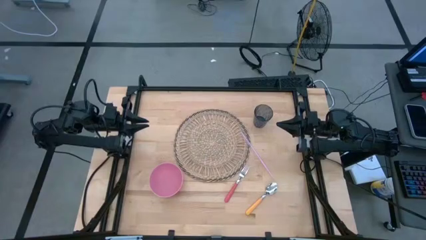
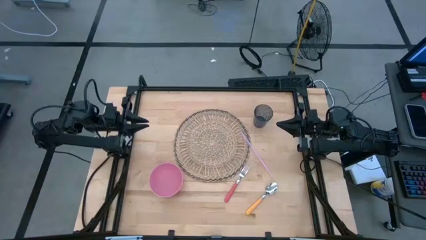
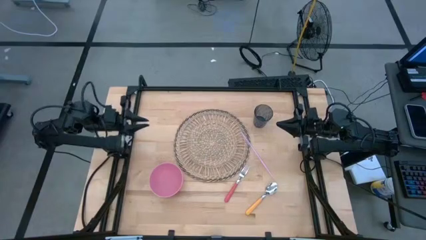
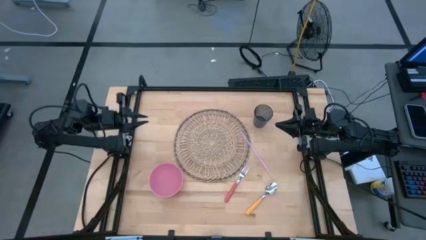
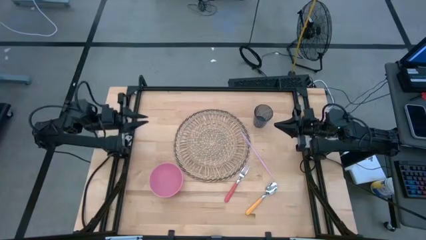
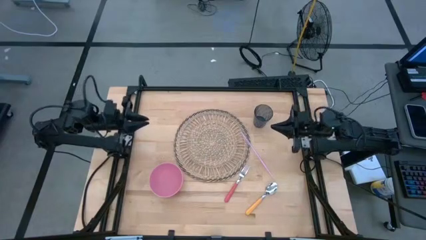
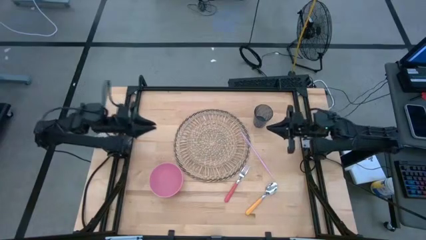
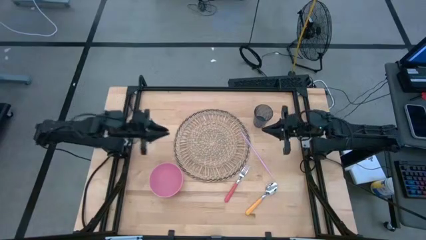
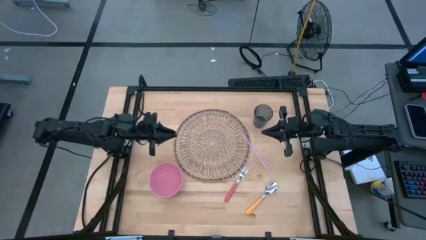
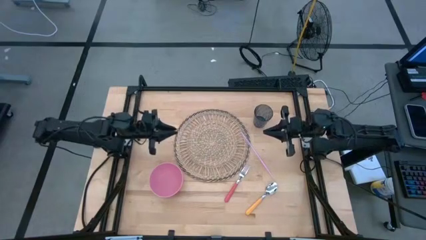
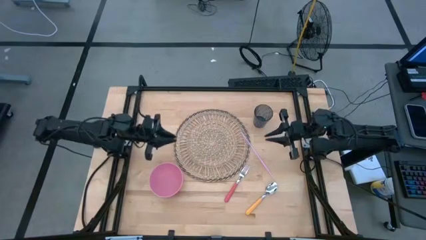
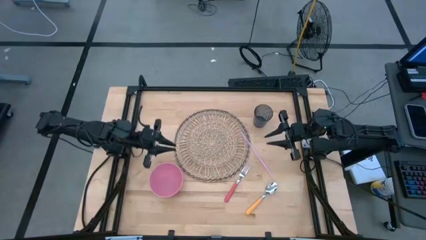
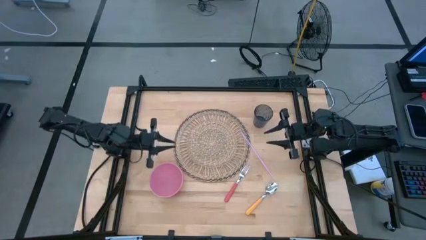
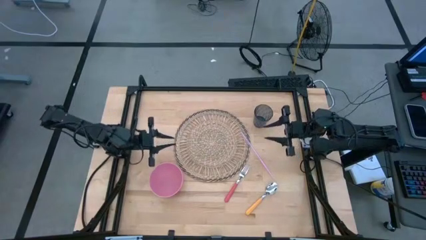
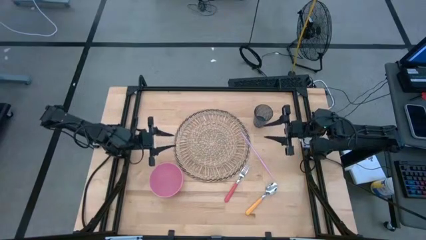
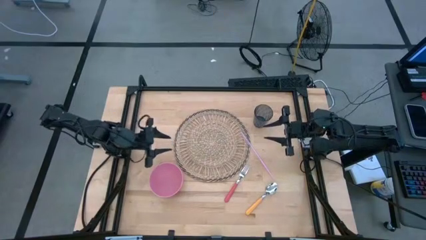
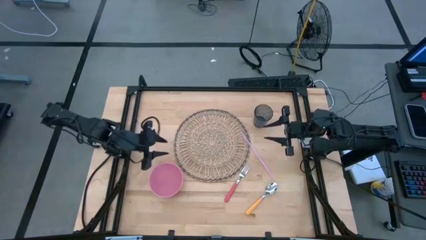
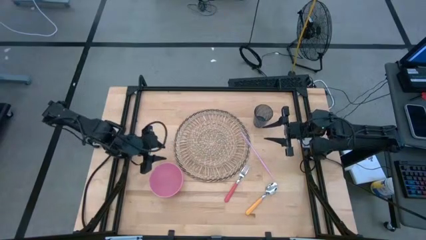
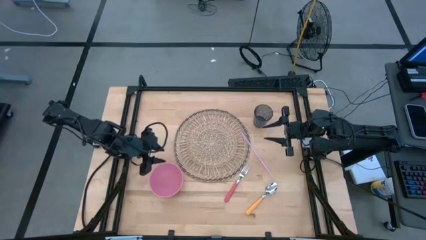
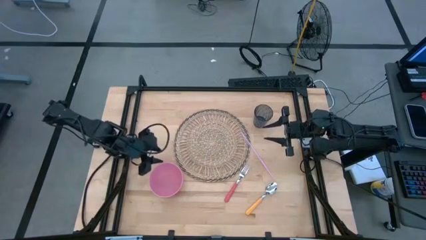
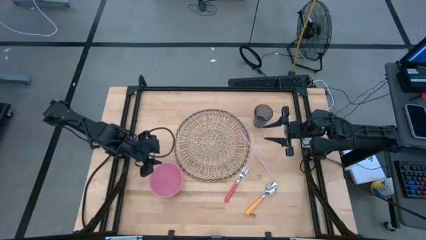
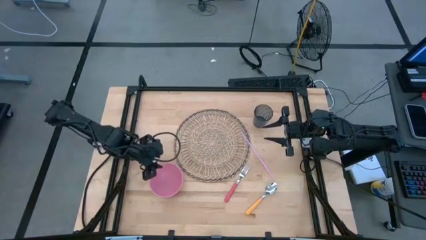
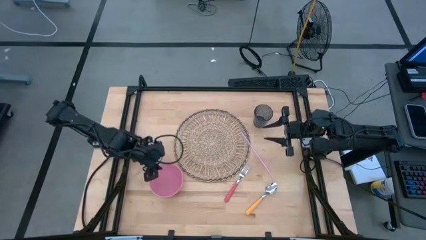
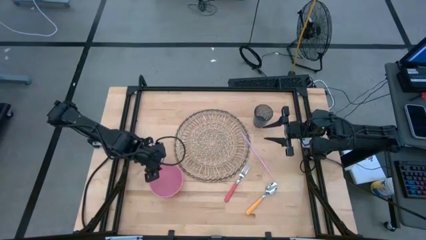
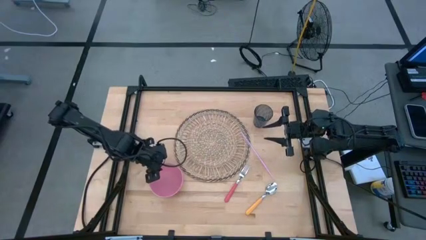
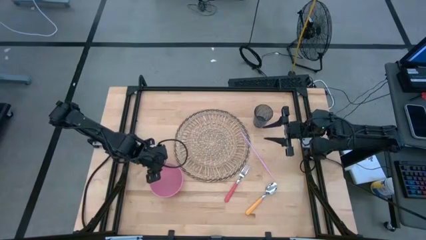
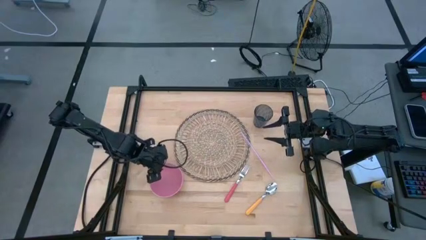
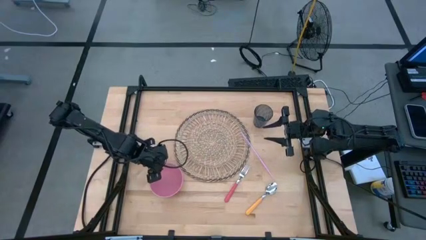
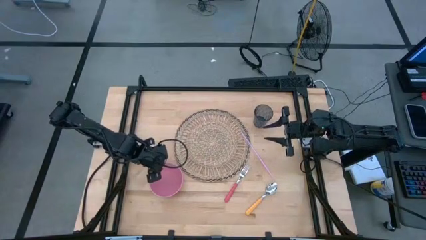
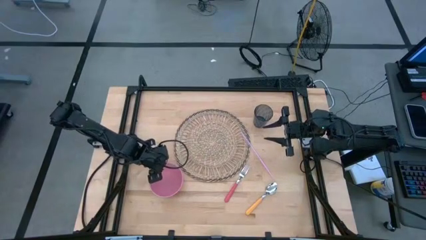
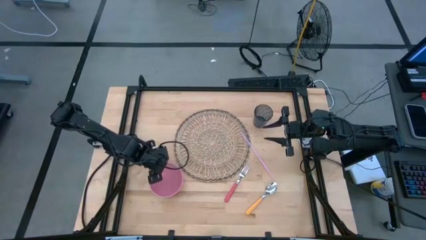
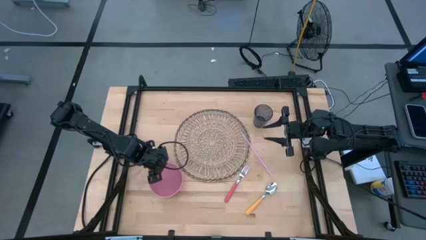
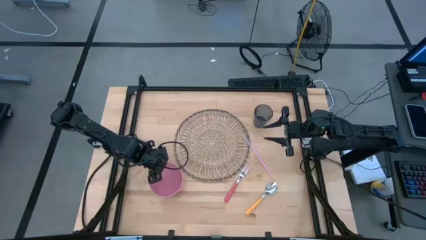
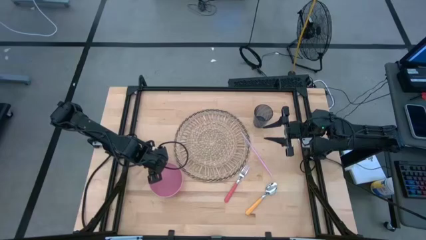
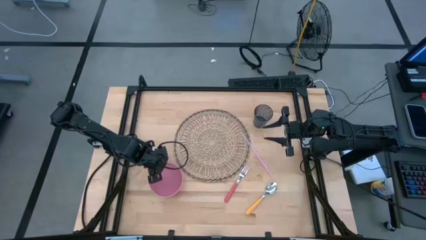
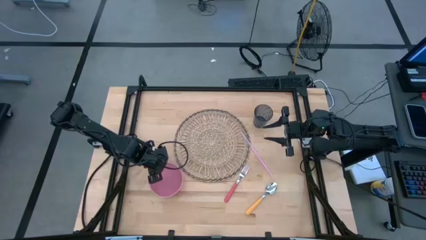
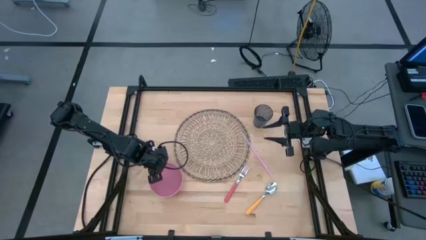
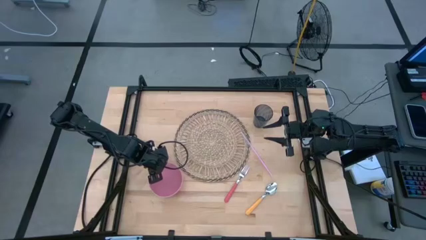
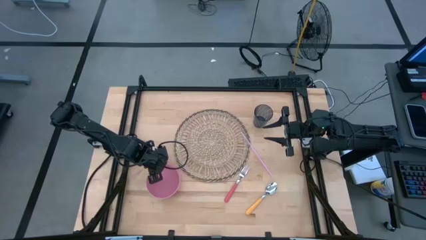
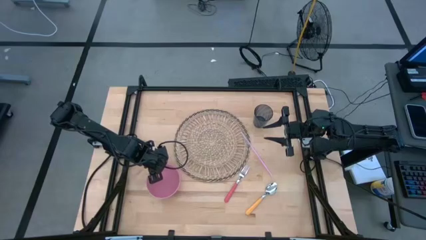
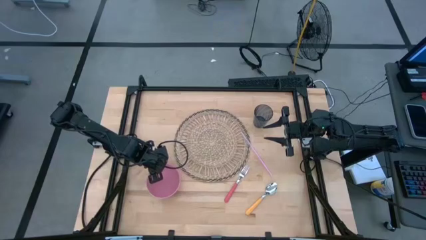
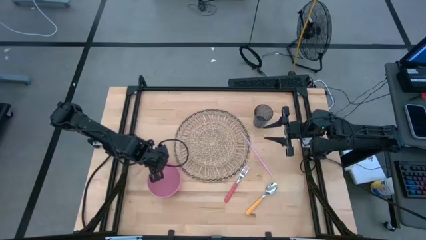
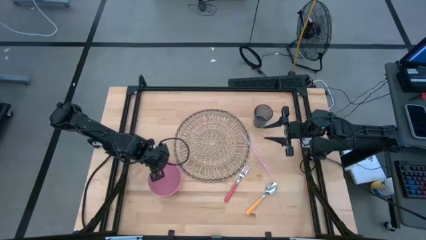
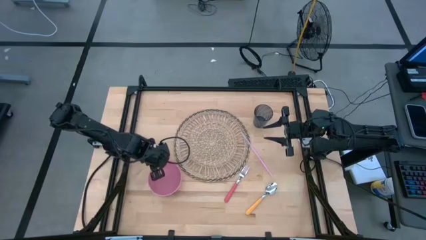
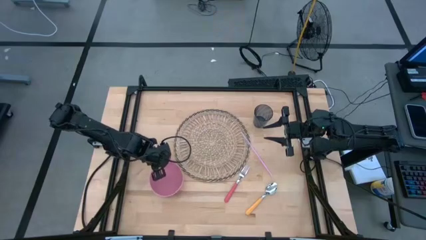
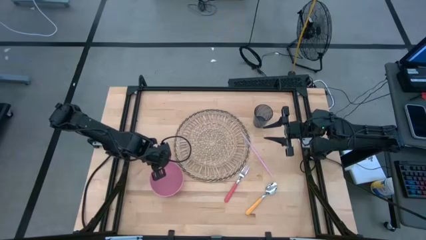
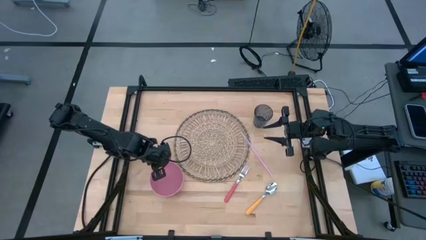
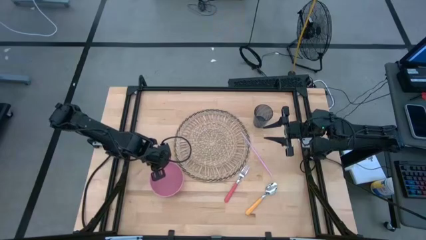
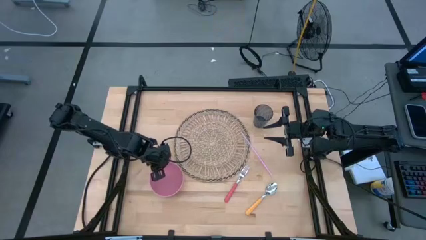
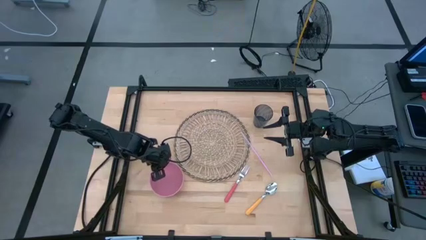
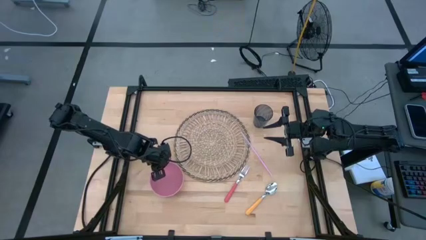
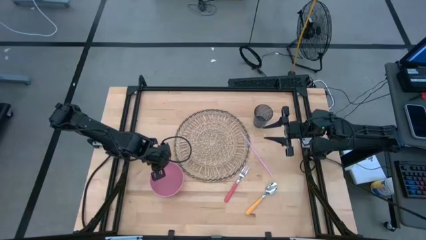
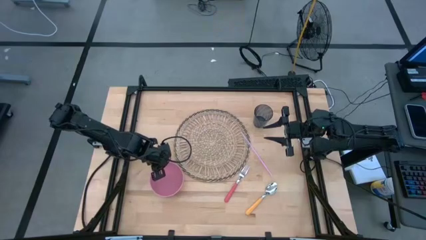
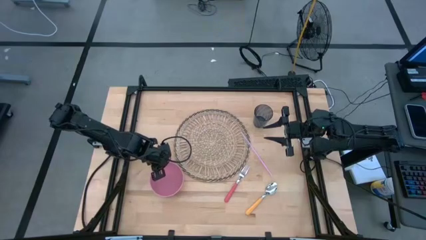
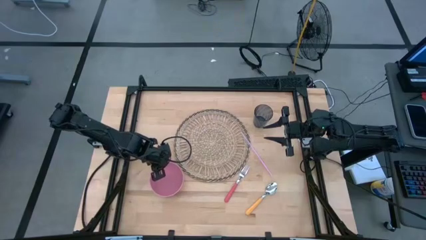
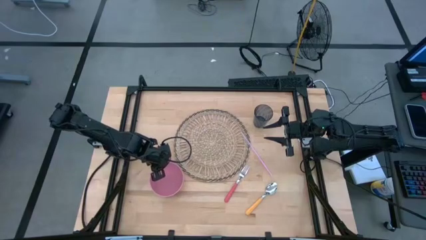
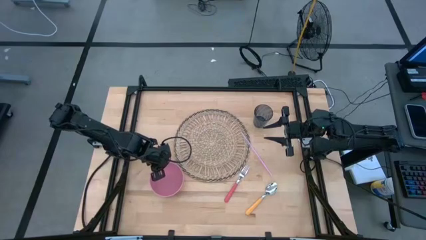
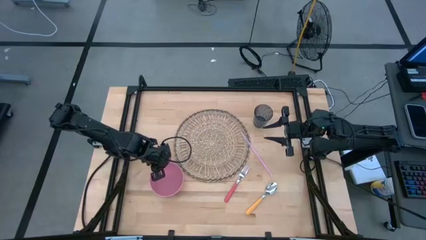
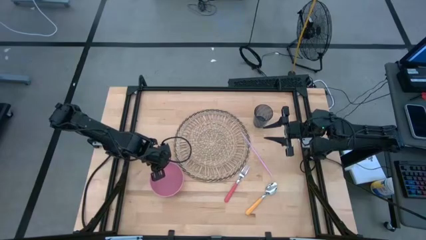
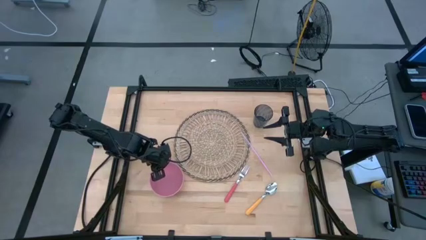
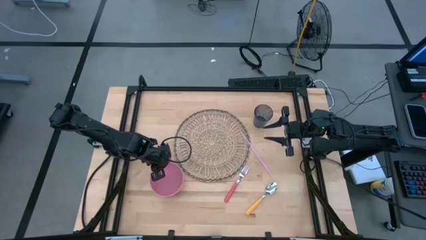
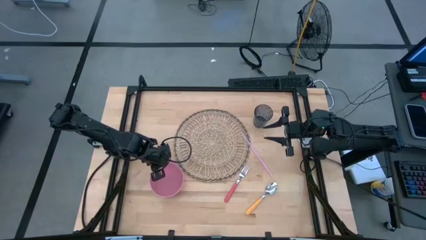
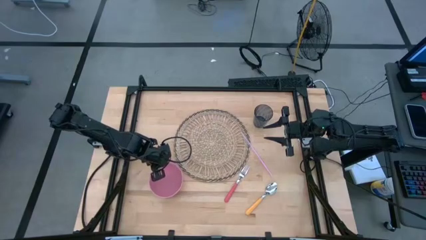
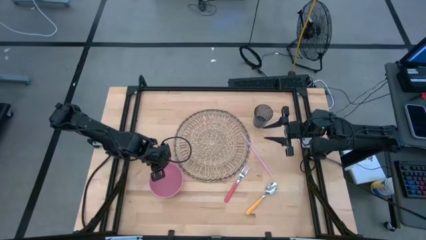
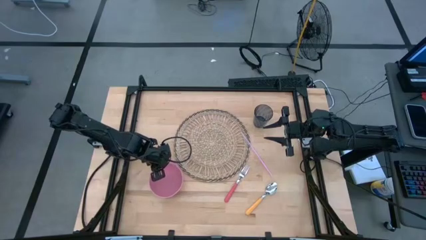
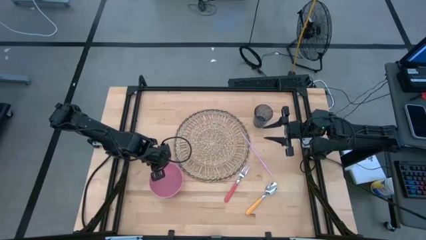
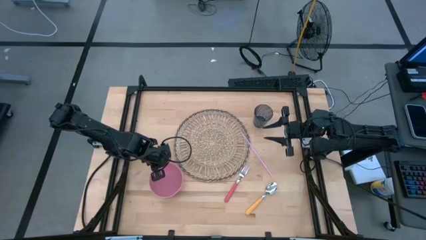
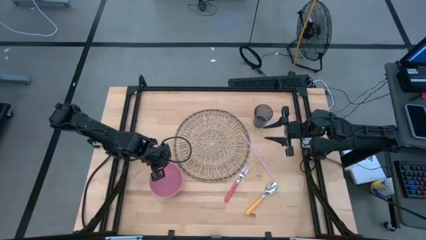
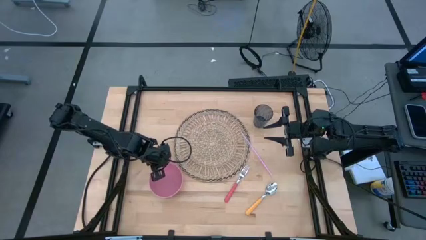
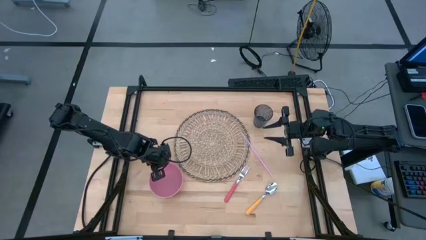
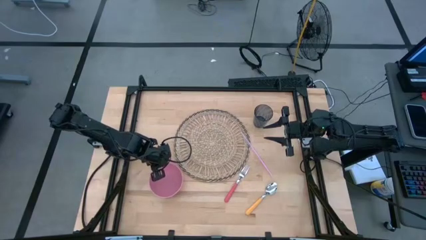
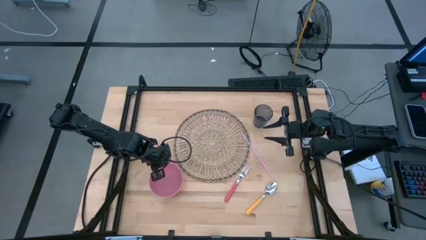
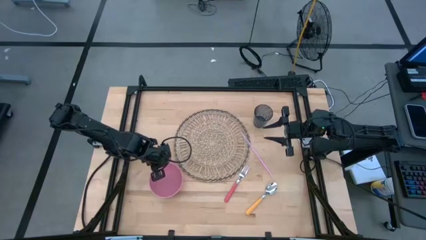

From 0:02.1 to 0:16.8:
Task: Pick & Place Utensil
Put the pink bowl on the left side of the brown mat
